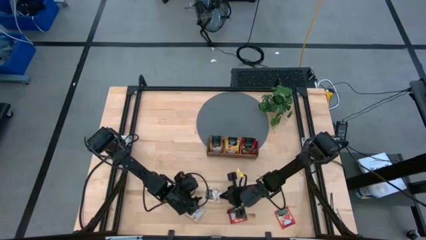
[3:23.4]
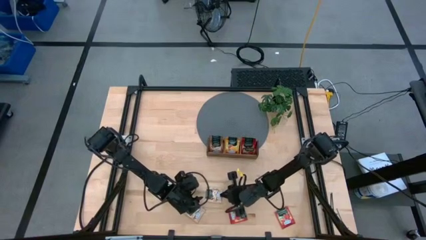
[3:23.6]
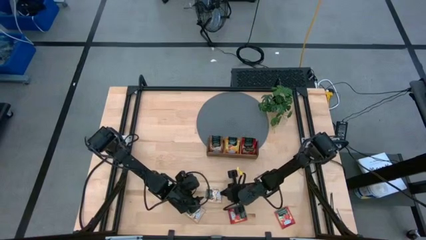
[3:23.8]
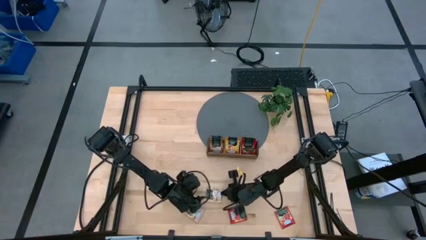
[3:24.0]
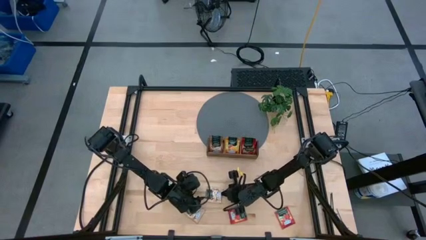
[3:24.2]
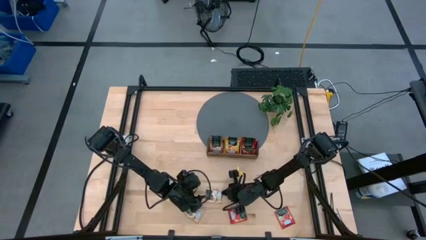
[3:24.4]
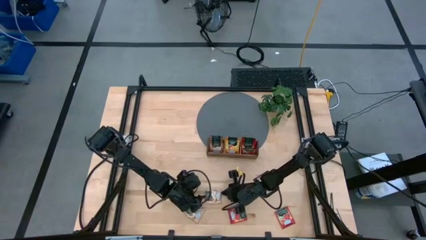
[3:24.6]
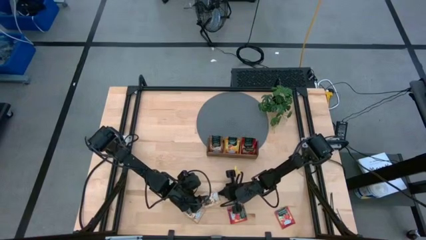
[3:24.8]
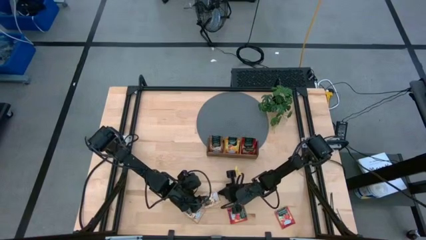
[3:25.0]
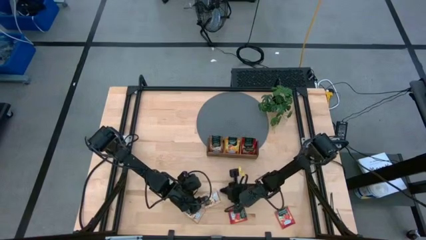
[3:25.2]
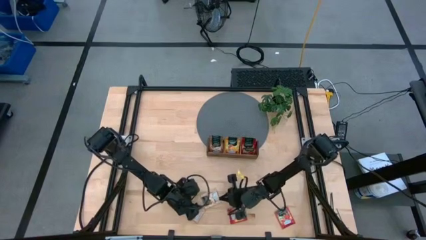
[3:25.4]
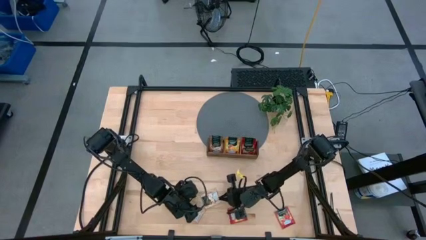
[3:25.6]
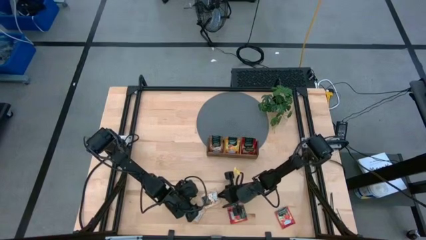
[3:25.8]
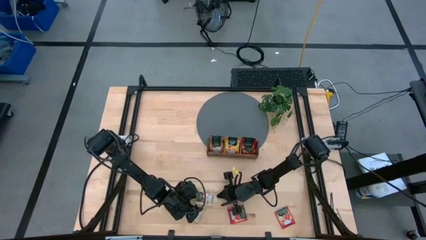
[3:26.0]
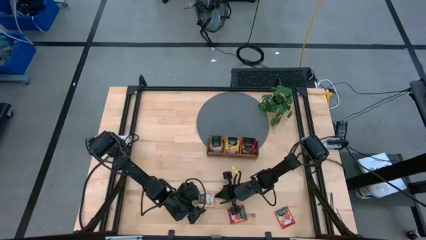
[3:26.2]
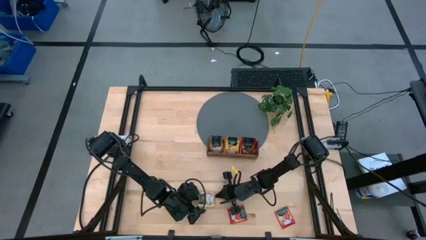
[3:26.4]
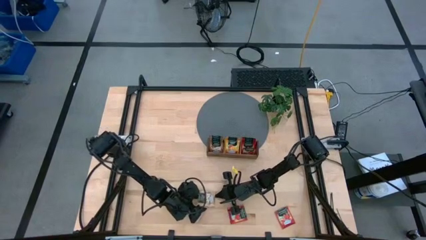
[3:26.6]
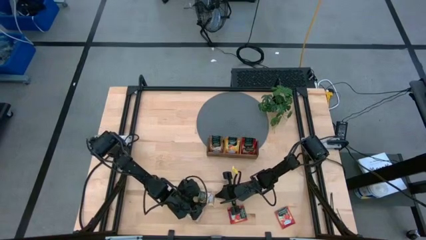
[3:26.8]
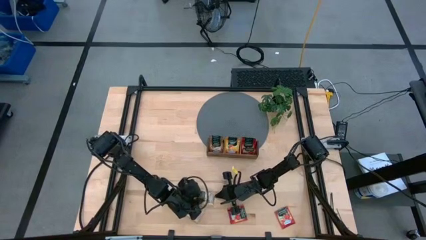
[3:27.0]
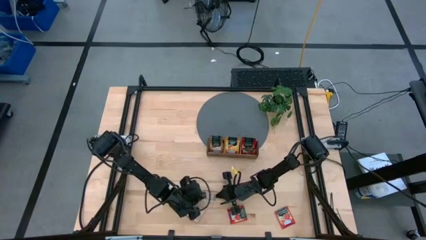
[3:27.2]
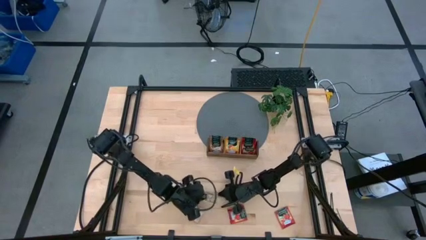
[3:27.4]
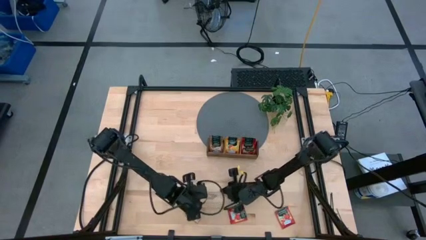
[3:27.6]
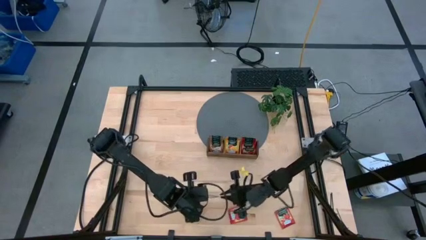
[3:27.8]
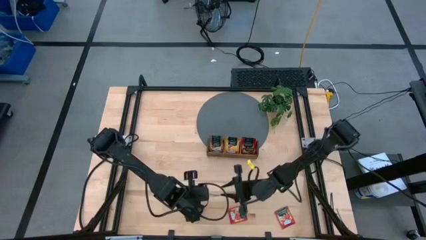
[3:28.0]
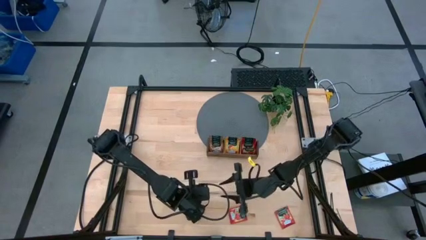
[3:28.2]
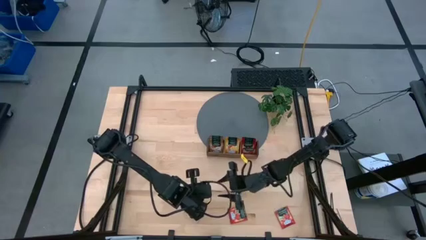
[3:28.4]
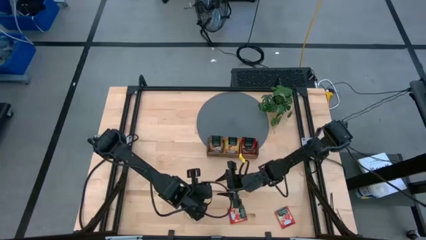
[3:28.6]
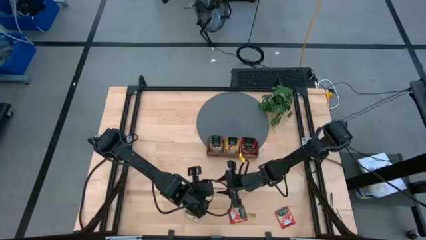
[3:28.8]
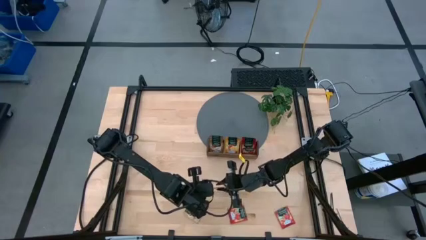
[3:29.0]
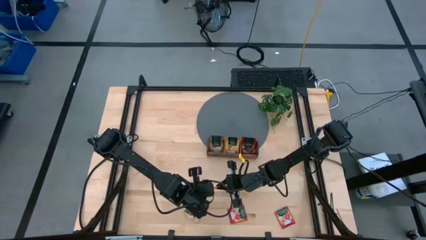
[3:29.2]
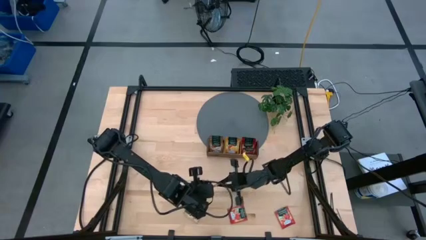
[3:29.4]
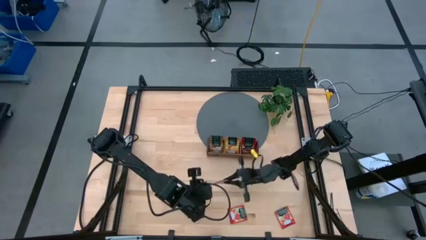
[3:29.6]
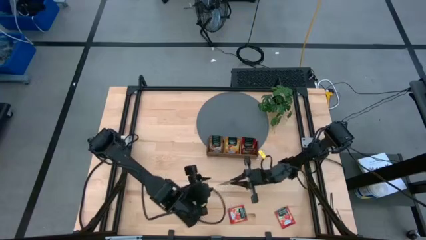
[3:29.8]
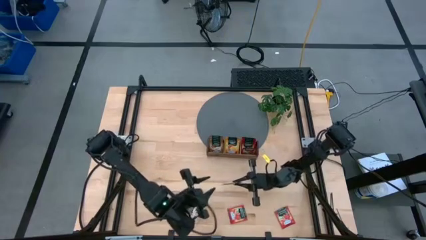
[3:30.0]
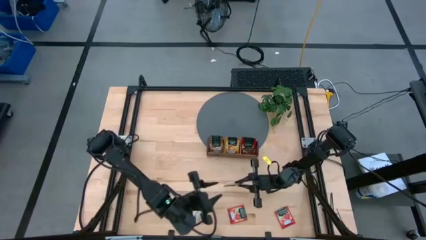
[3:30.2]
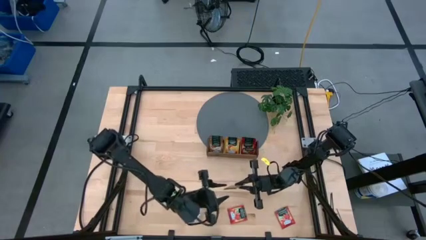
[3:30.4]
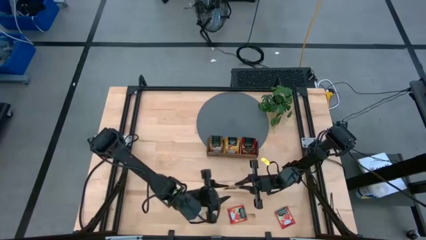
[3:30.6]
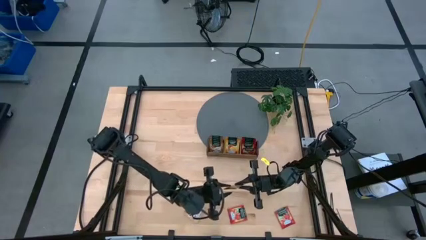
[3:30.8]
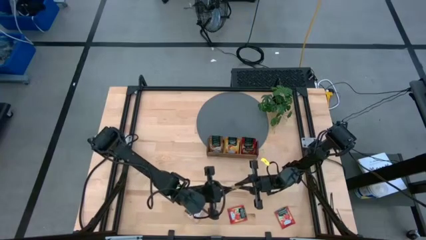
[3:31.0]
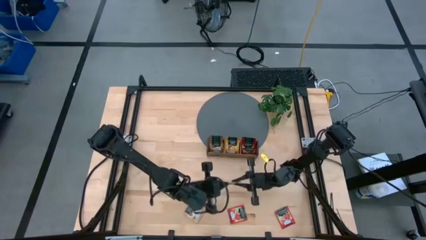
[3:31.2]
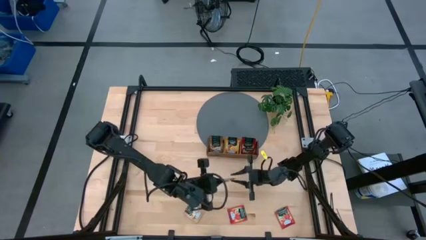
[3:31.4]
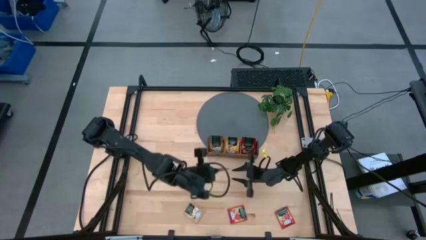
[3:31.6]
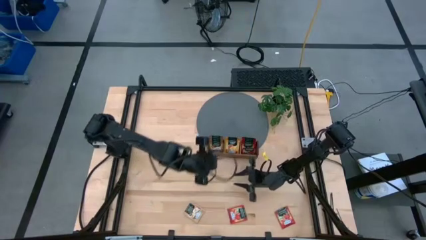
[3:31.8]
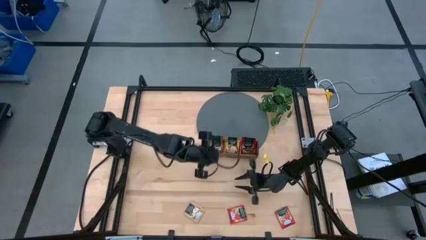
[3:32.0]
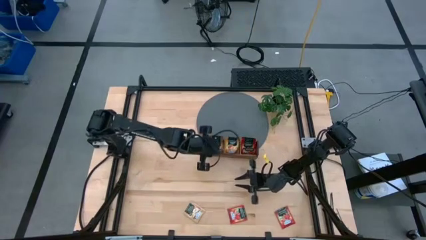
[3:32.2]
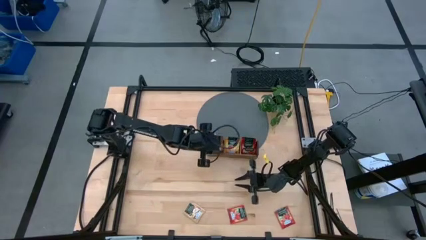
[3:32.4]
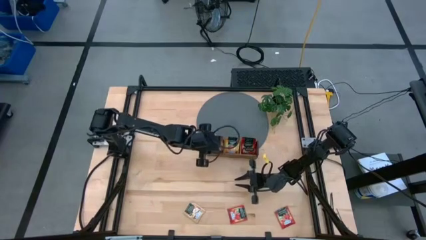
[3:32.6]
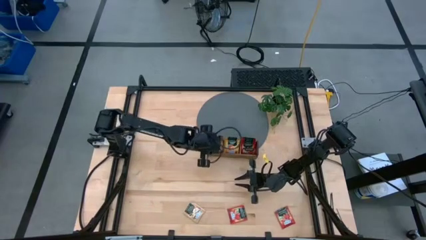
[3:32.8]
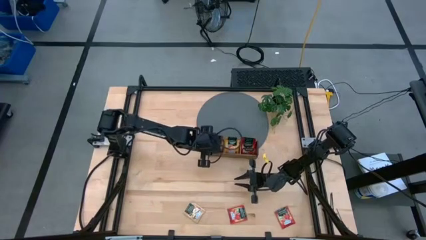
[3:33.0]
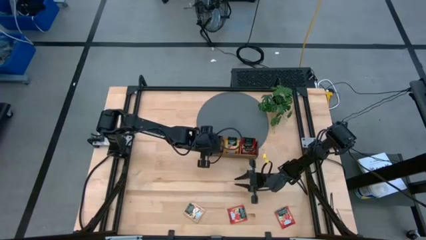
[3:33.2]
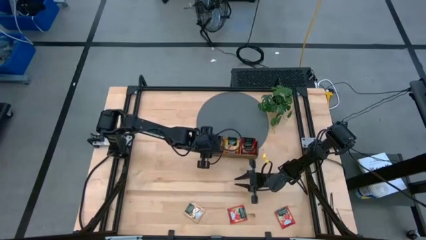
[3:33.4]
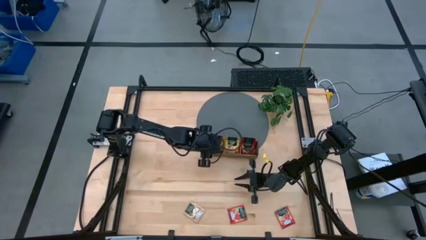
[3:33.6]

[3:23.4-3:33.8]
Task: Pick & Place Tea
Put the top brown tea bag into the left wooden organizer
